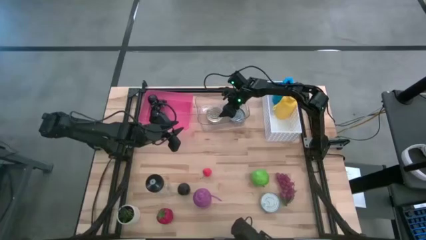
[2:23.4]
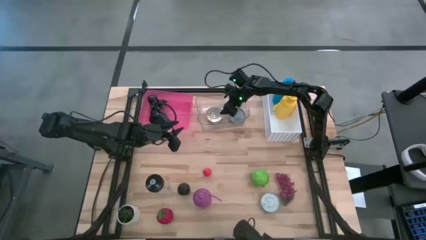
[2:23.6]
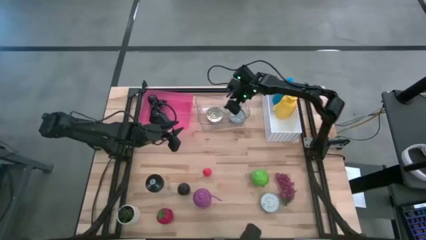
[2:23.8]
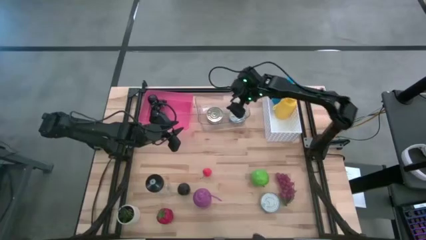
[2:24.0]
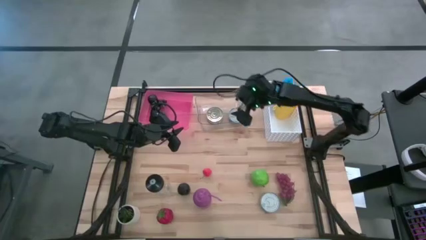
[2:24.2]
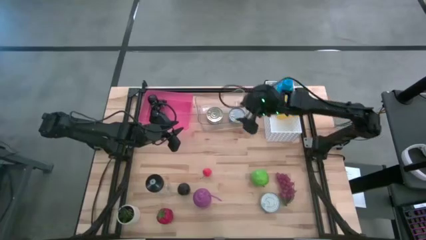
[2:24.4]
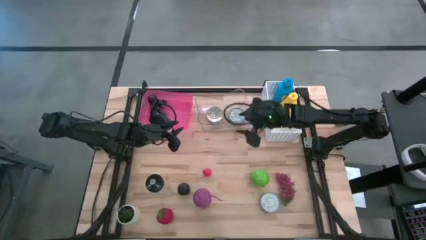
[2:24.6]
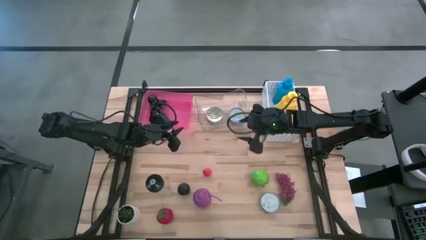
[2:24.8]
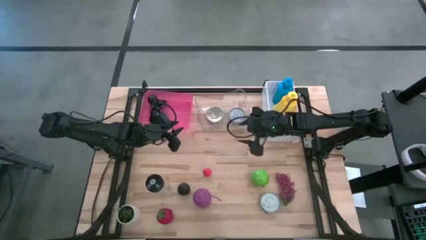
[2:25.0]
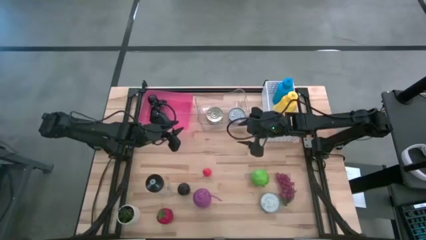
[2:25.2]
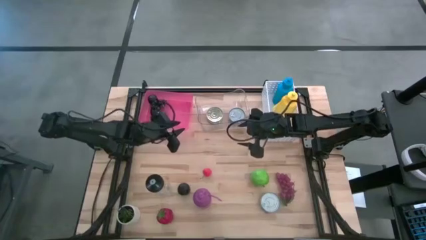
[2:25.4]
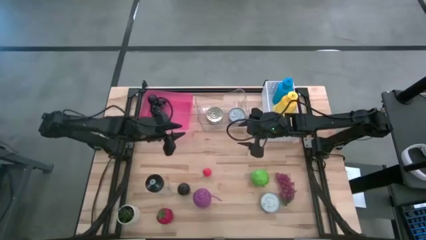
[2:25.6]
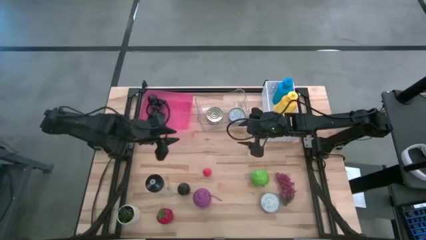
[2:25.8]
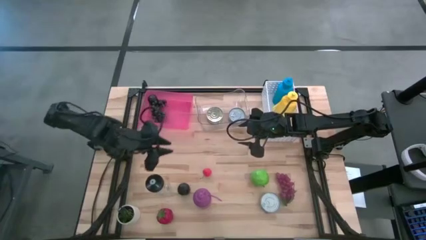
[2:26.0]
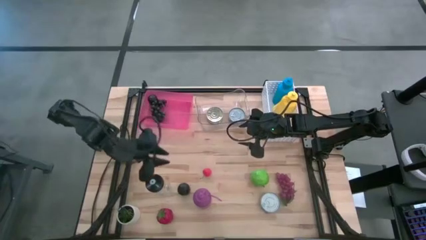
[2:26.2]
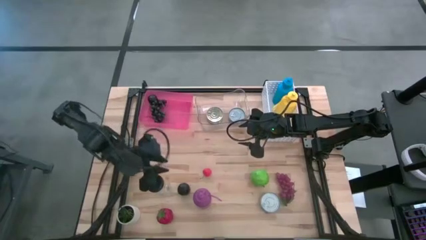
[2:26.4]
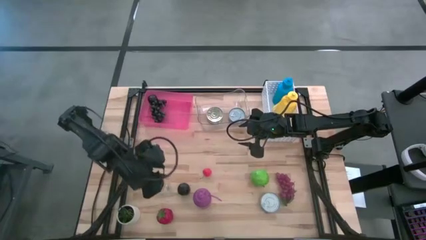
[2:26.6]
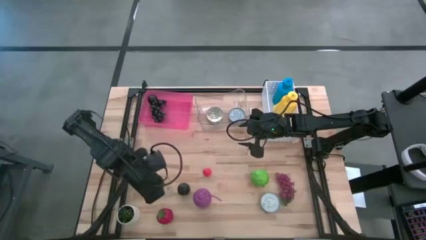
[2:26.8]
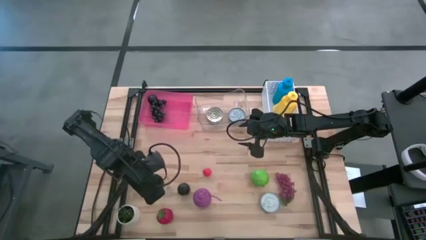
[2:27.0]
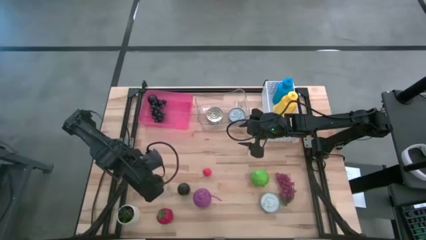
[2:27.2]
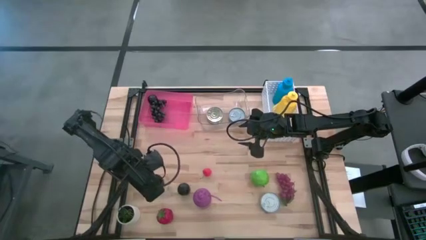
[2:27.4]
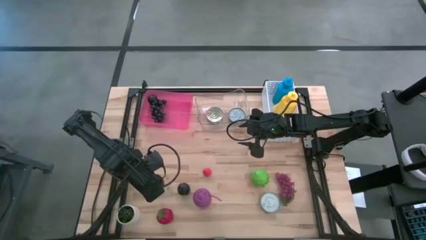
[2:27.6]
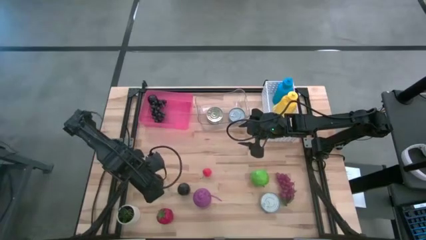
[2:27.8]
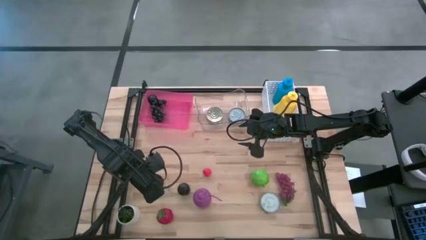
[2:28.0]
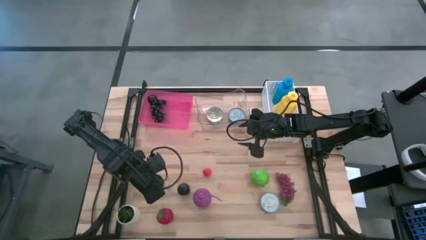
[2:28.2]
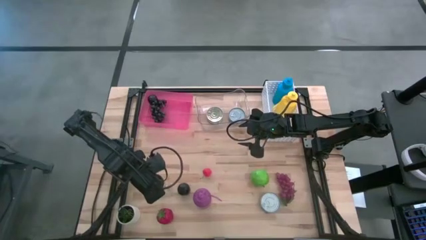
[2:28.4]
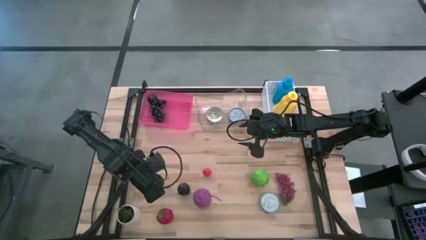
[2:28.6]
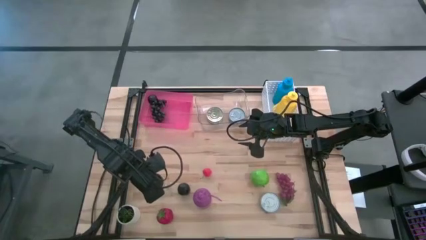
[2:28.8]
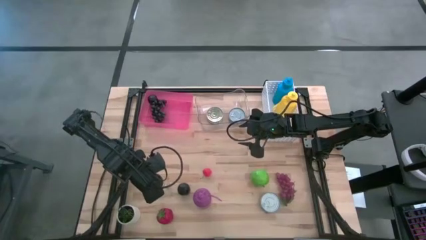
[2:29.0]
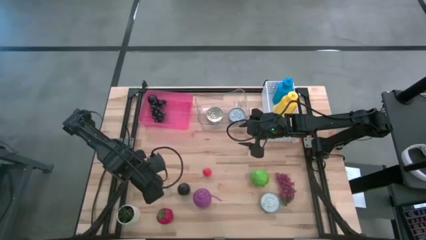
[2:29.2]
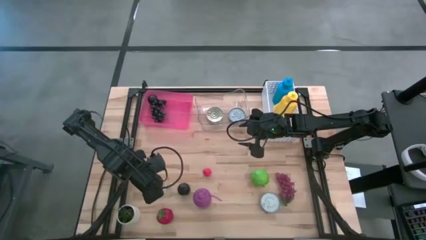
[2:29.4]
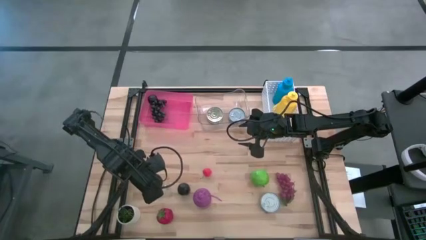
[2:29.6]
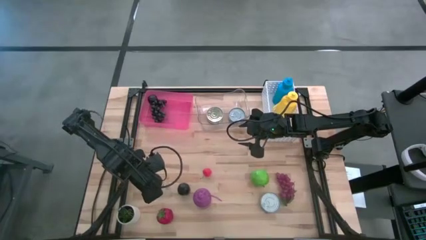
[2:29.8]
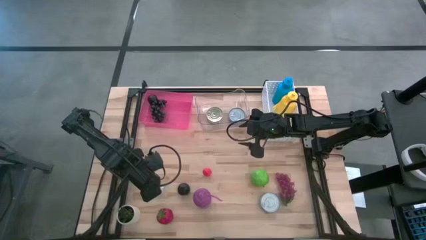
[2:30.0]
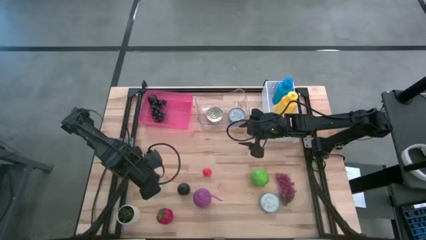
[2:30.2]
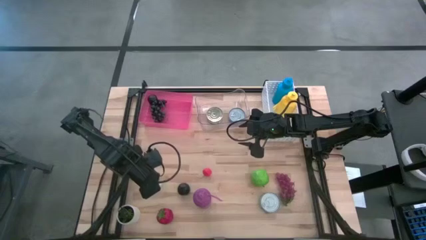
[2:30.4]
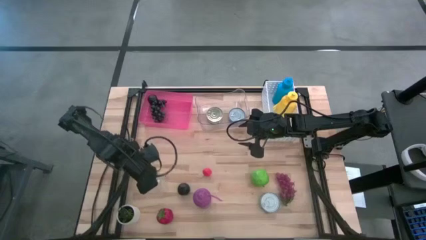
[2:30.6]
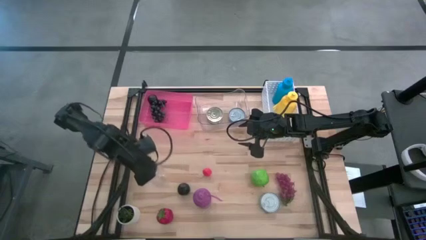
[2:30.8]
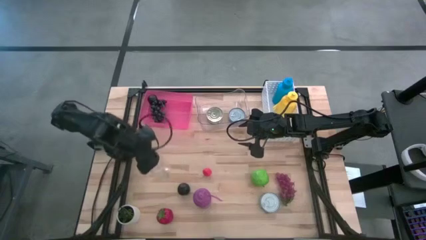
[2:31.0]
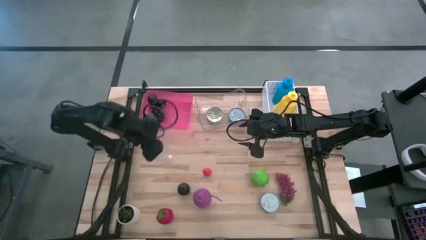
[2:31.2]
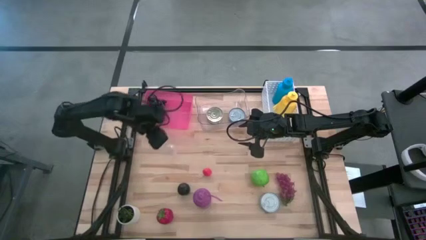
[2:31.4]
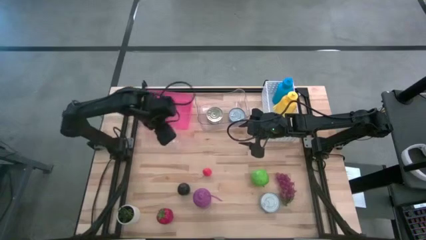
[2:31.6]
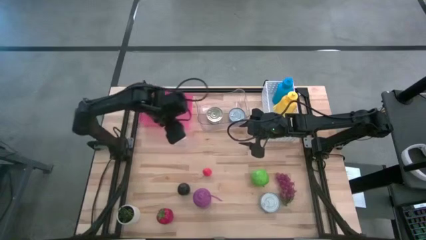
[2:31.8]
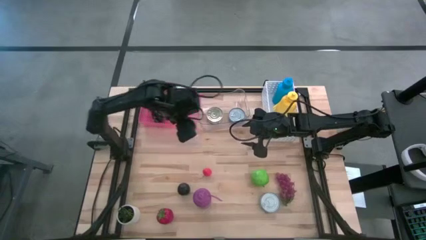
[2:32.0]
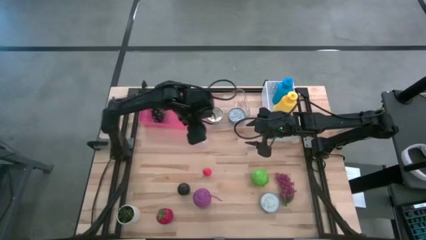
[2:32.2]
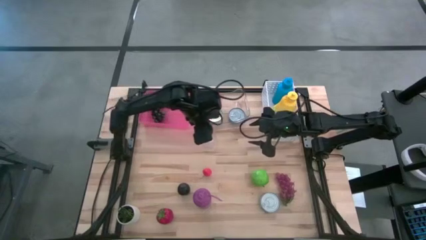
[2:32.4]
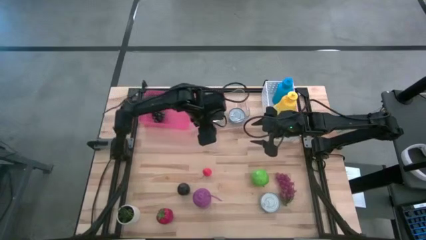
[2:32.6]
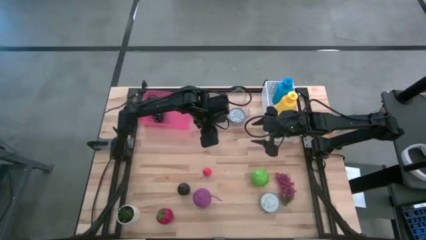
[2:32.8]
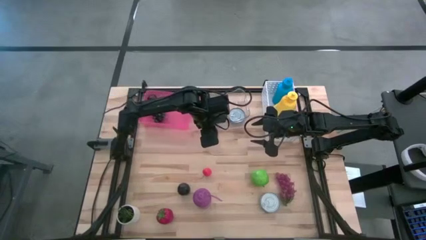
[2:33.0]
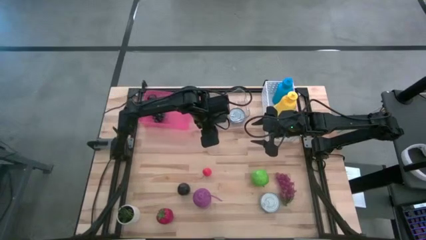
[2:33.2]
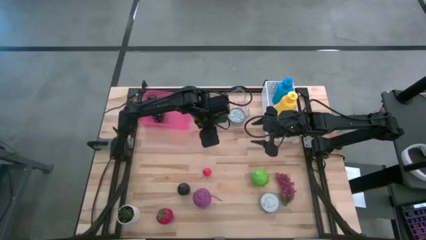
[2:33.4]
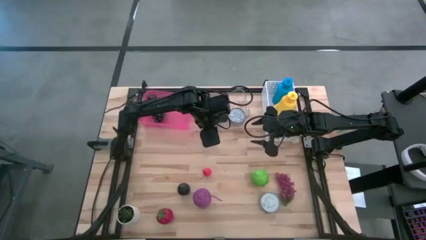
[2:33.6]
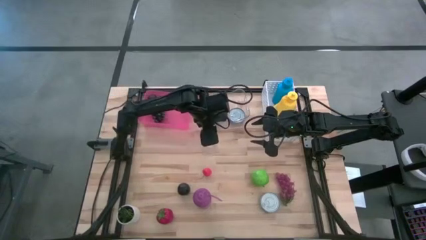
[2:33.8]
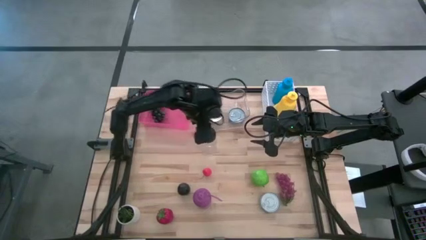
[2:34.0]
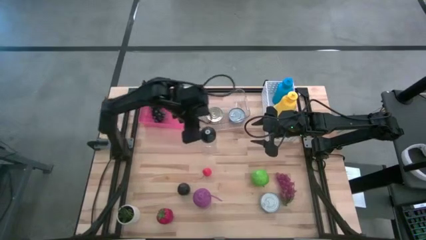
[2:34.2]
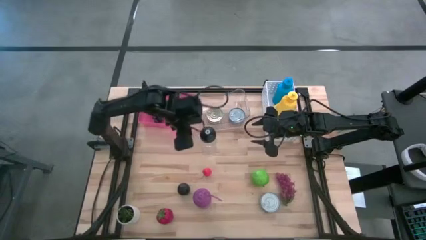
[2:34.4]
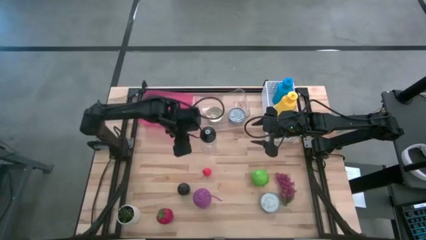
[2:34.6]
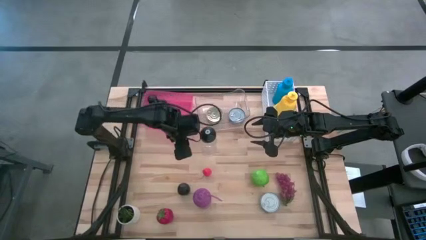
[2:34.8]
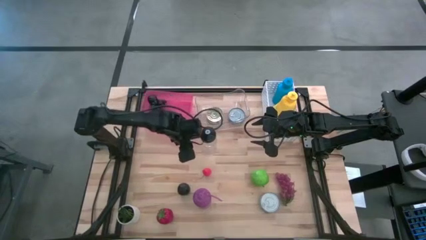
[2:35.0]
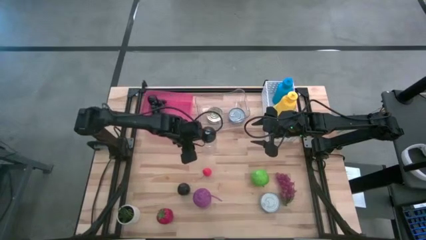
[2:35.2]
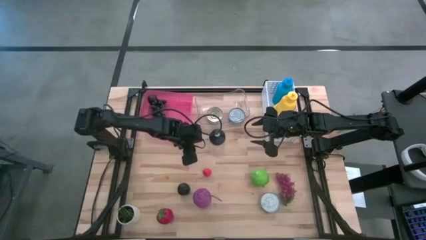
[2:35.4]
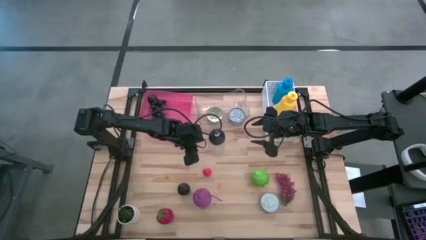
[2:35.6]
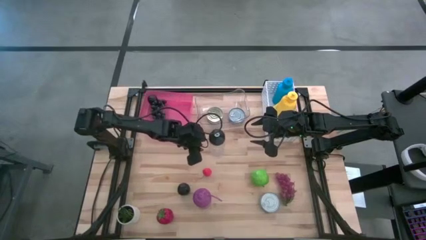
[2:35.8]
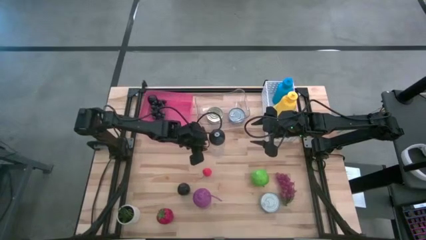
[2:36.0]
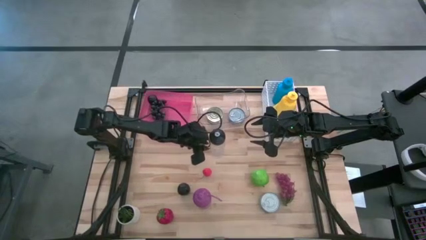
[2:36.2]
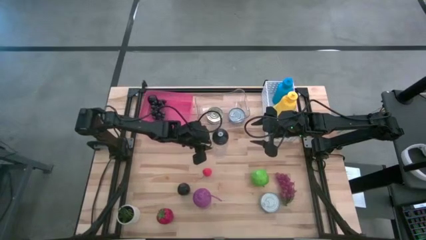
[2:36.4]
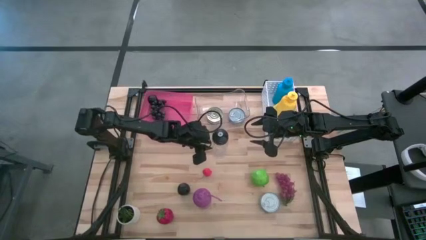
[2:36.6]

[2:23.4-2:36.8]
Task: Pick & Place Food Item
Put the black water bottle into the white bin
